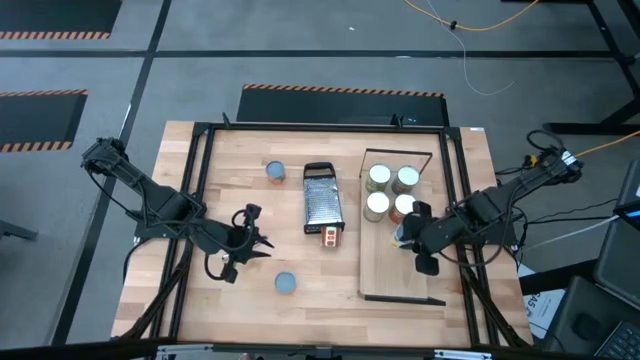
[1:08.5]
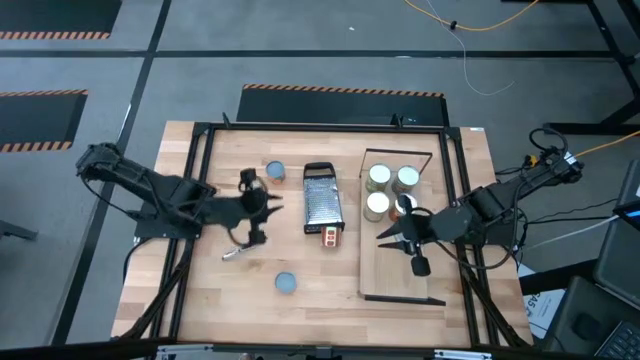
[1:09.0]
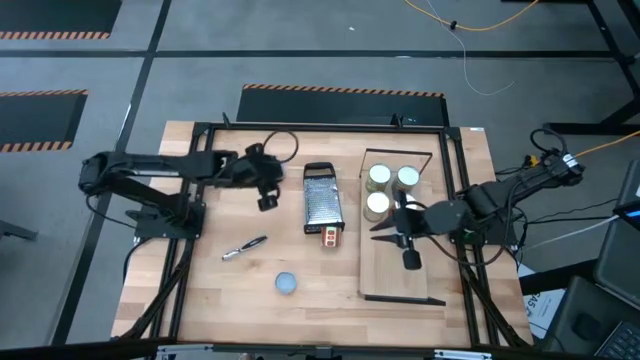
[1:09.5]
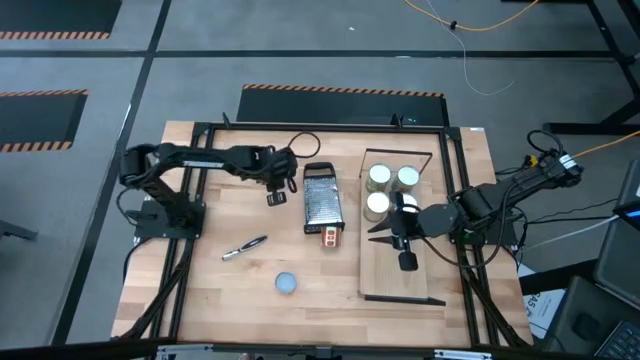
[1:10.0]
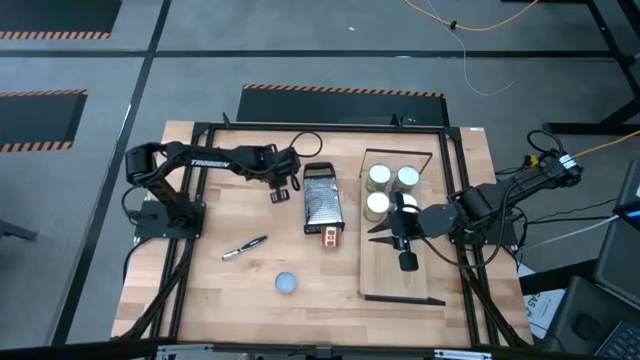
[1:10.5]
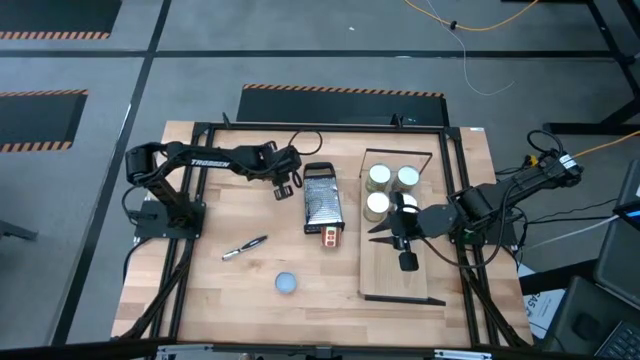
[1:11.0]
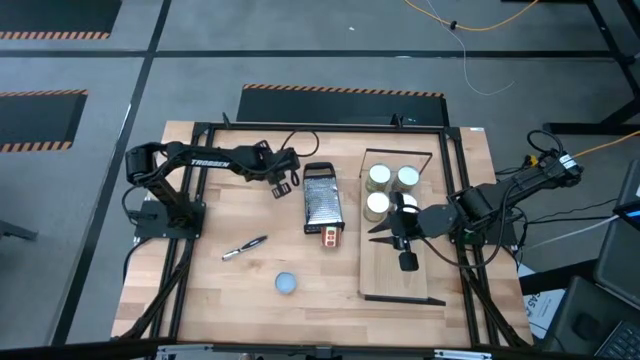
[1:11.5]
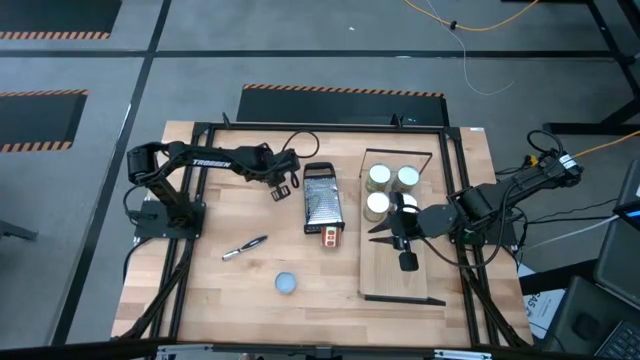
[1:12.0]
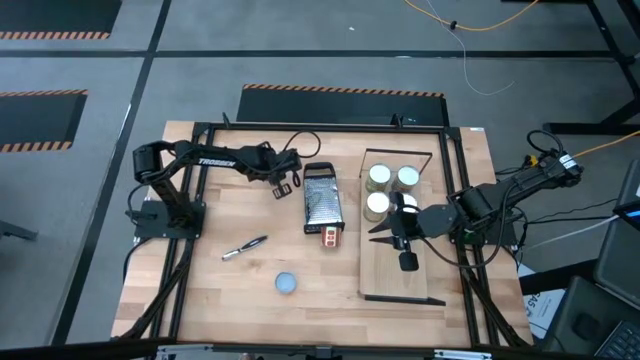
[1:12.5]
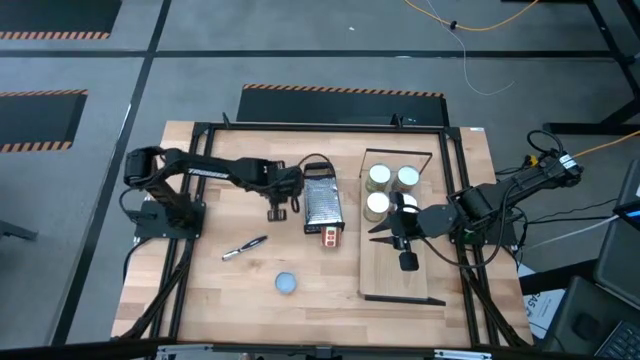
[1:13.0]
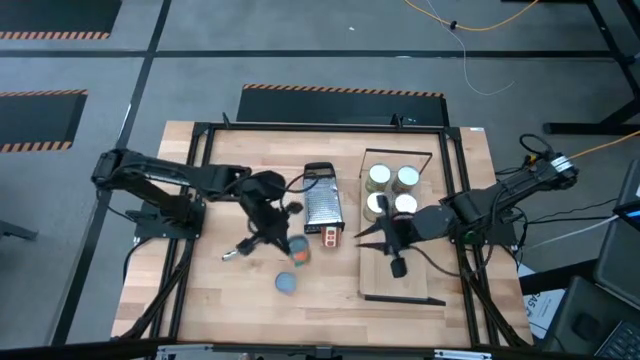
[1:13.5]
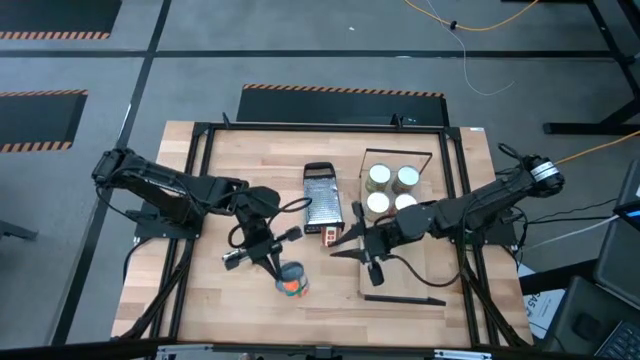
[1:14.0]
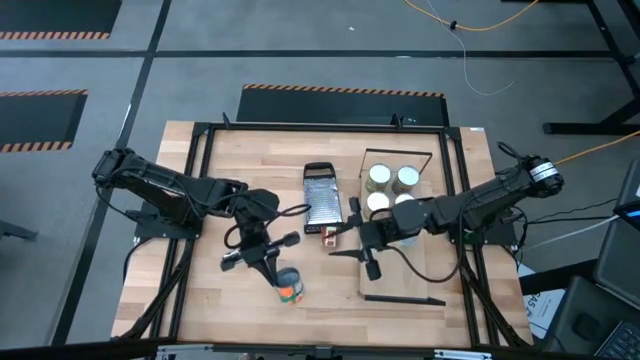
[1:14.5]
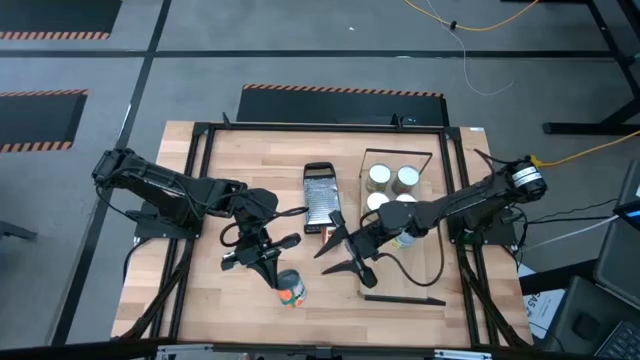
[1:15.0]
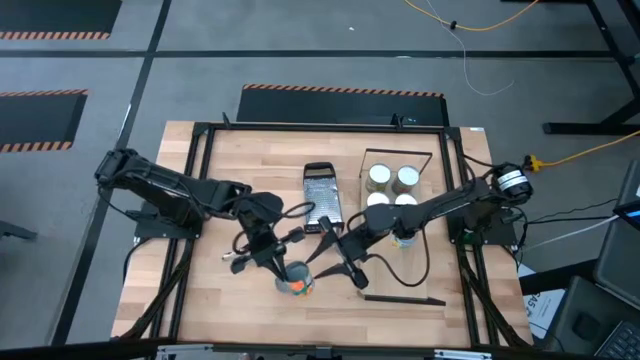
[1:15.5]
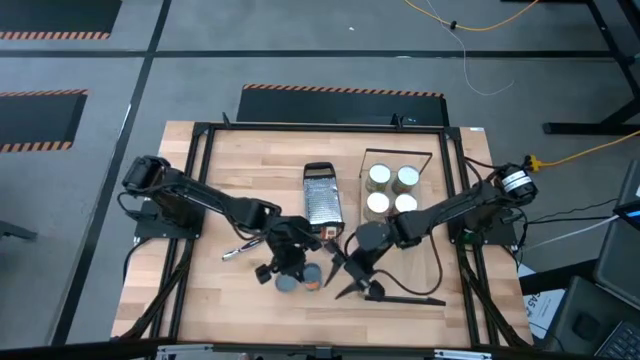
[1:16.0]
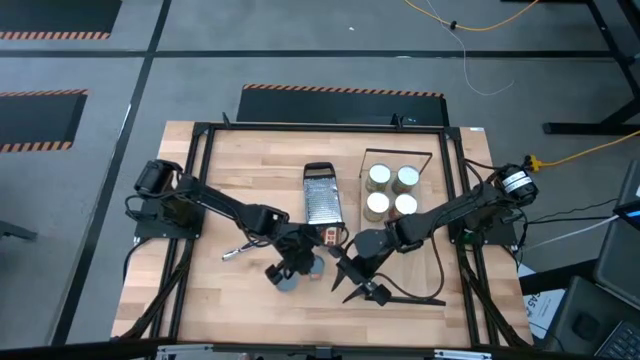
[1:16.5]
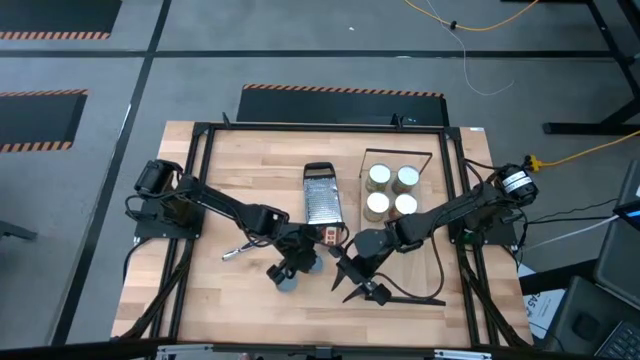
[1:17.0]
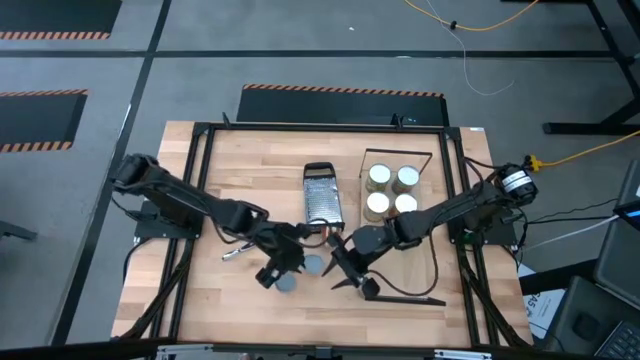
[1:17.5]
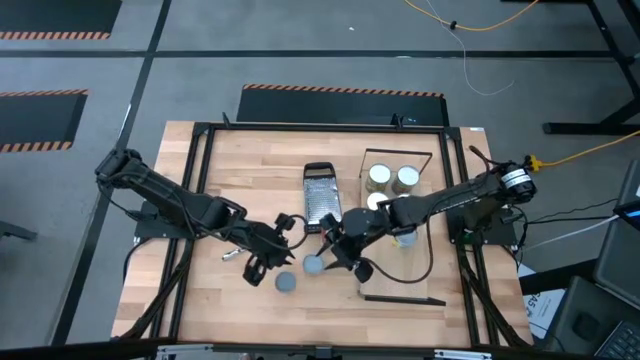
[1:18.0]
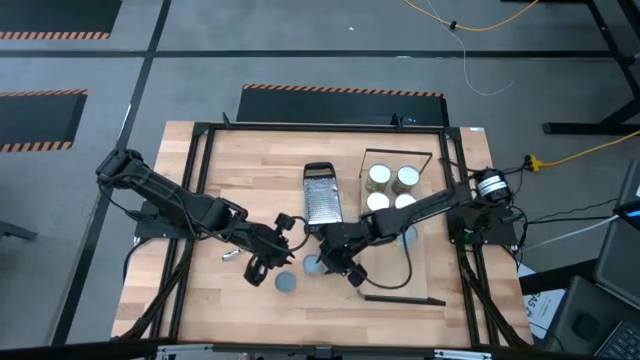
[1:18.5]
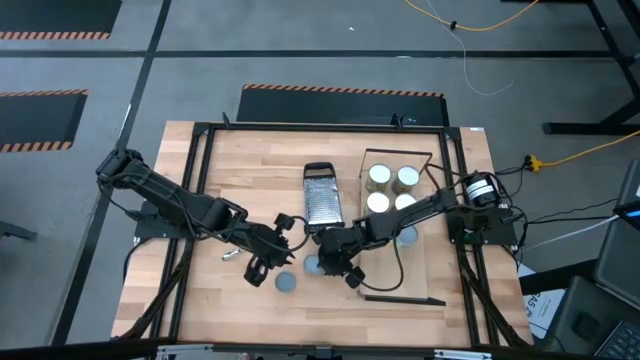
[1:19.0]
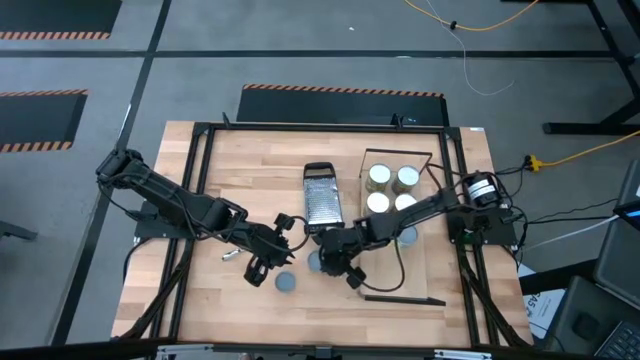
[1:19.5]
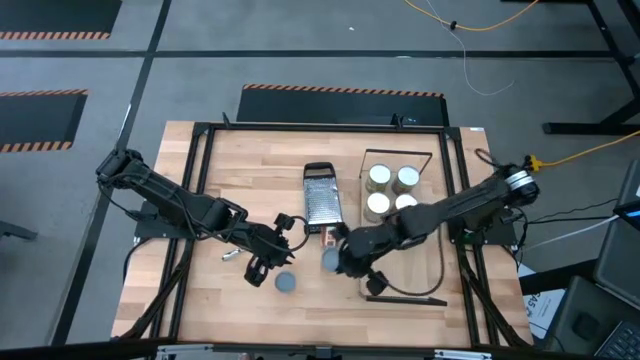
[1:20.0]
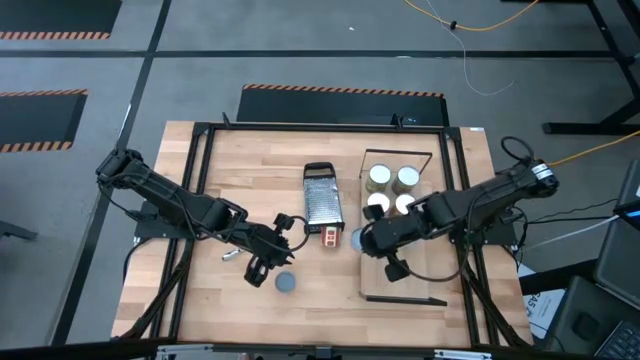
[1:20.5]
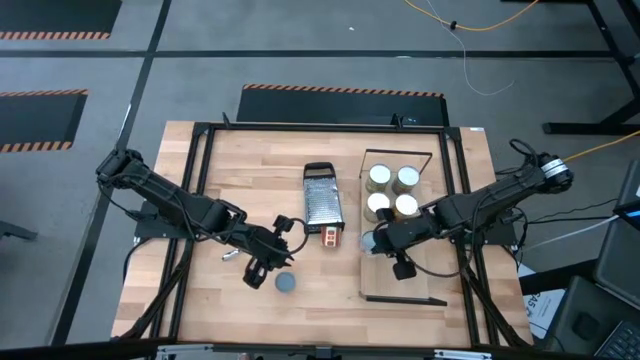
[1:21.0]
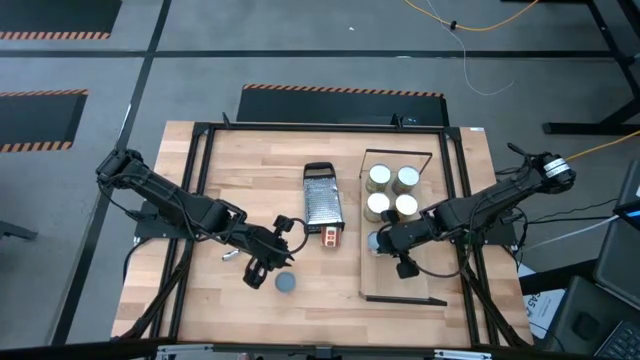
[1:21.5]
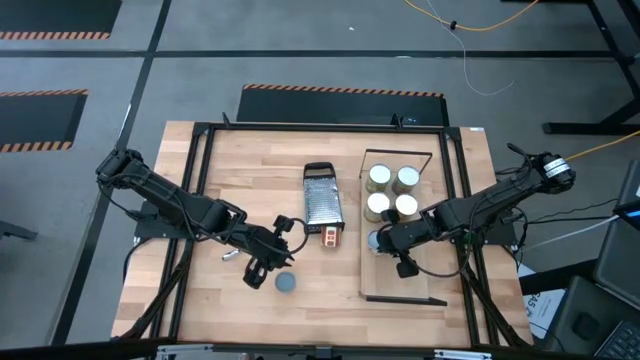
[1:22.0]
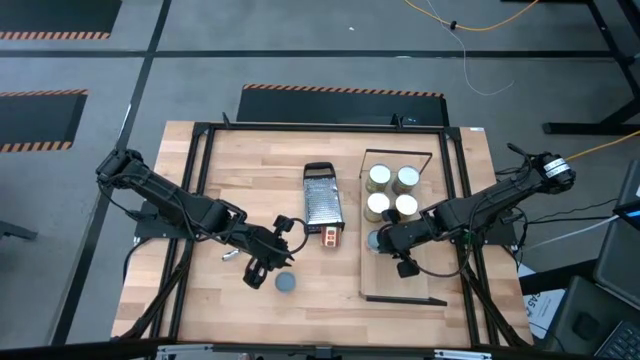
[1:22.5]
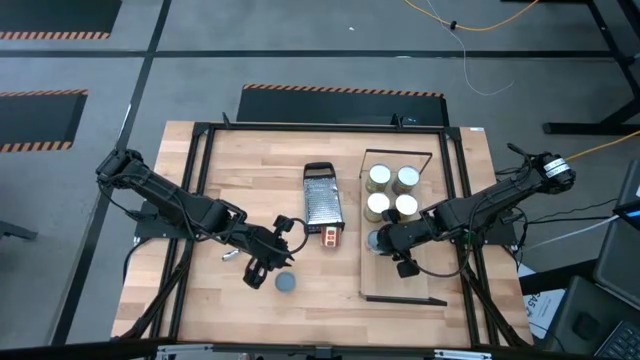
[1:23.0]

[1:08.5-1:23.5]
Task: Pick and place cans onto a shelf
Put the small canned oranges on the shelf

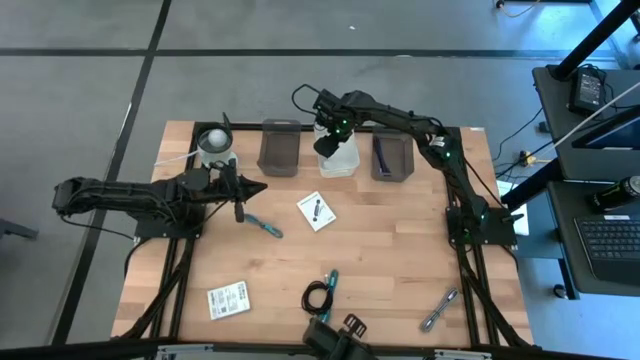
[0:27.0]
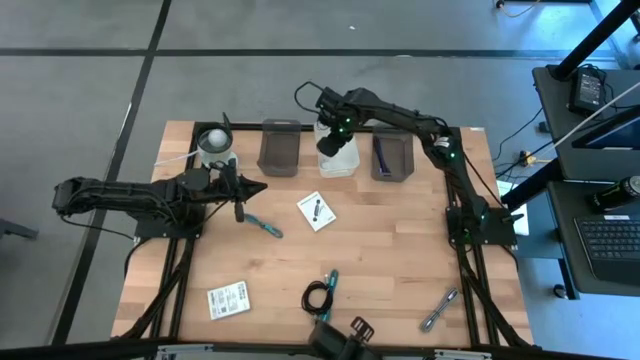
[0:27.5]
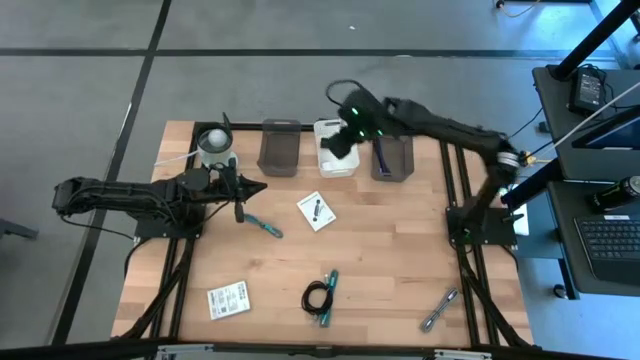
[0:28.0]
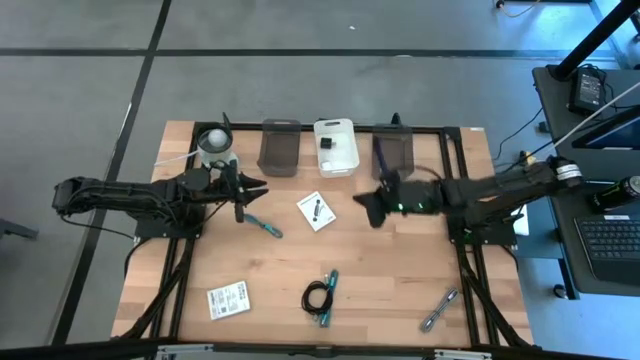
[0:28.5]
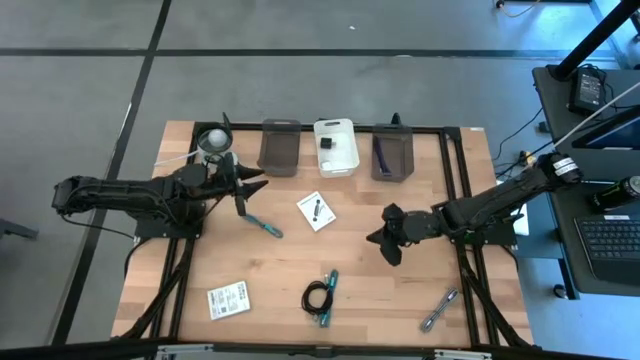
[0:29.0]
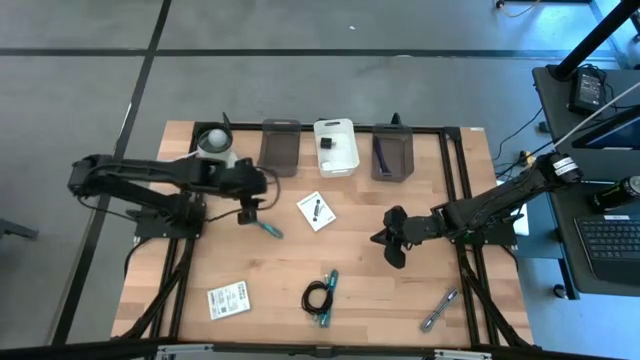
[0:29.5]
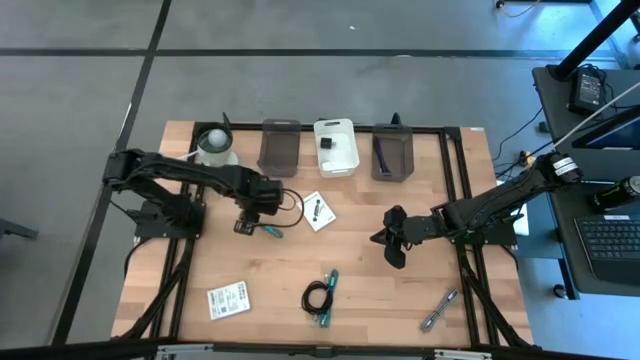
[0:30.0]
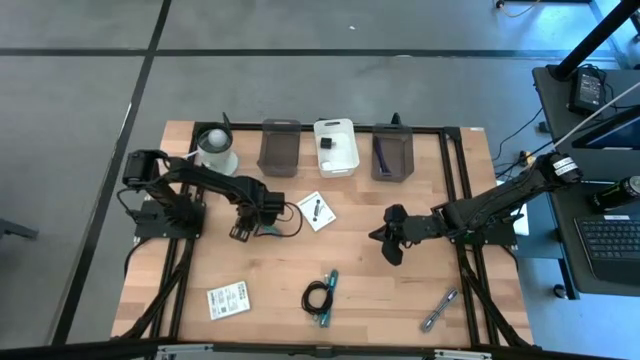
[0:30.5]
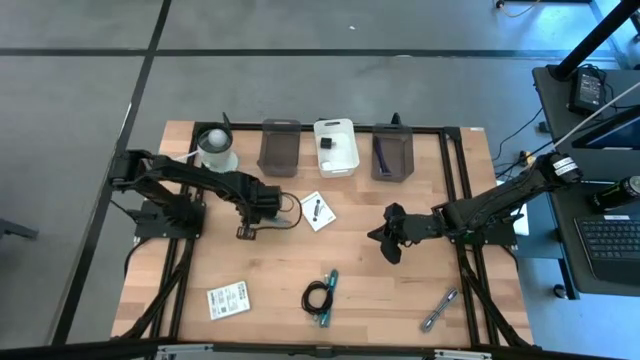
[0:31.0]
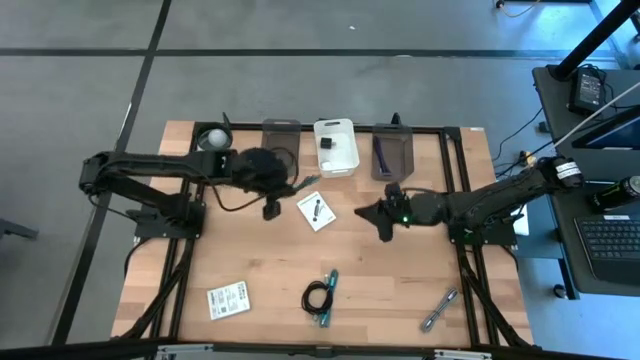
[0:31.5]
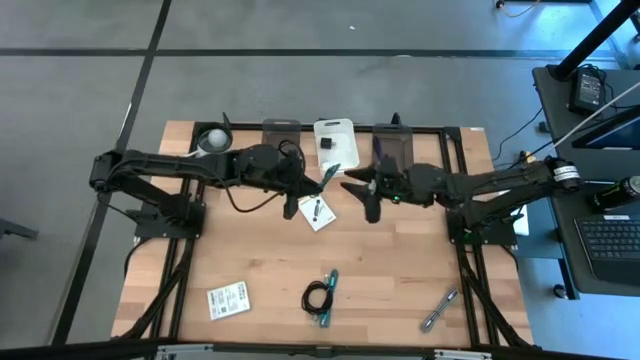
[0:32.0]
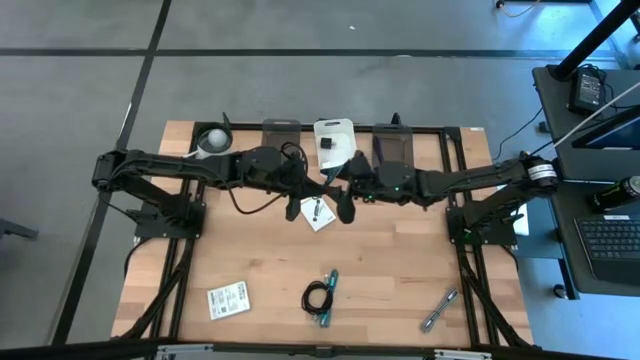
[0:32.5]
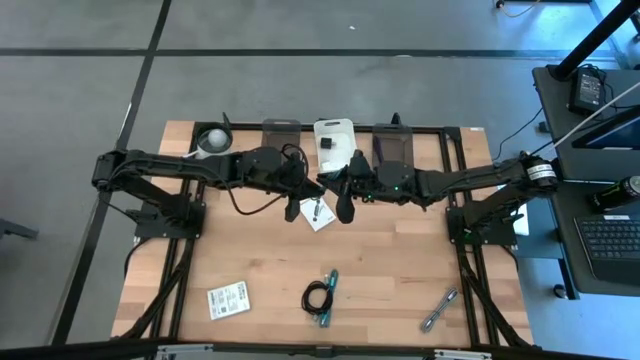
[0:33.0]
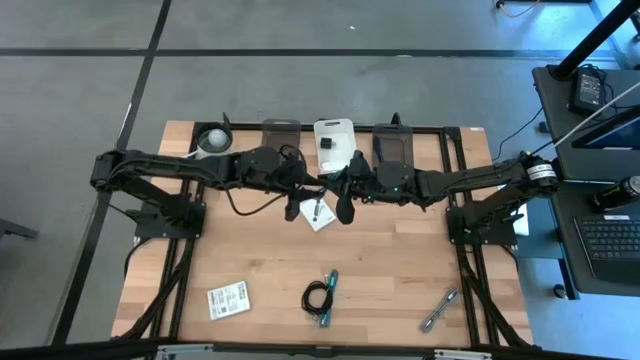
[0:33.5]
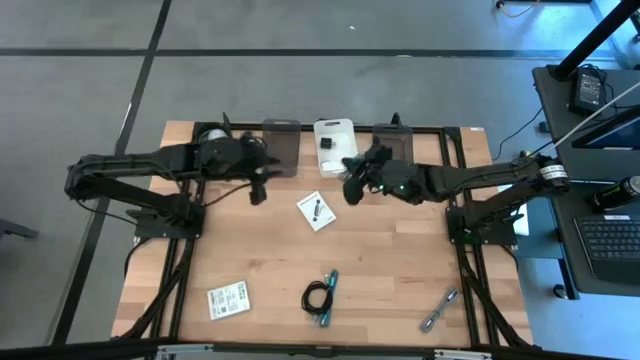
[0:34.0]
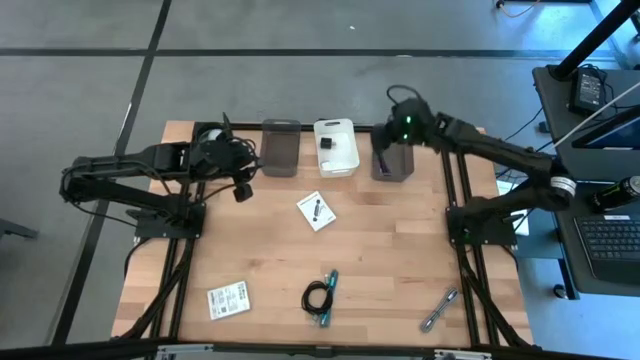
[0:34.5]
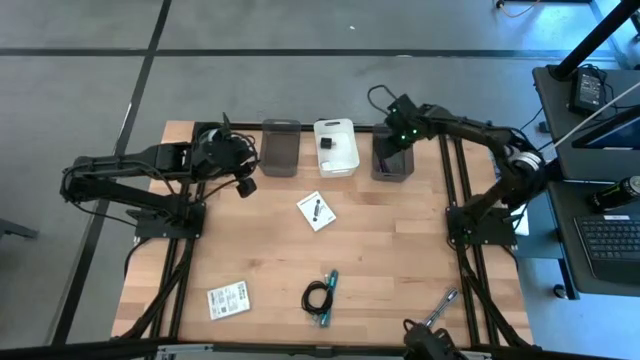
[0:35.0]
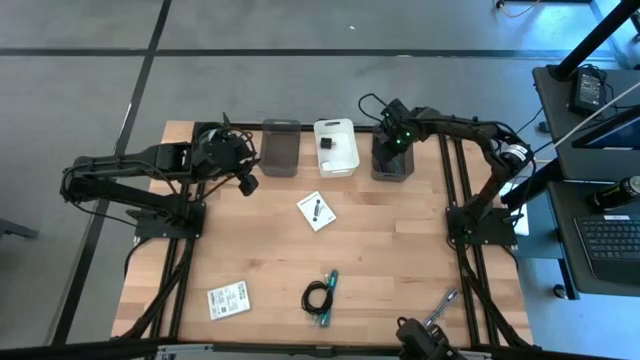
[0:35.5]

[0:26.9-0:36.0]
Task: Pick and place items into bin
Put the blue charger cable into the right black bin
